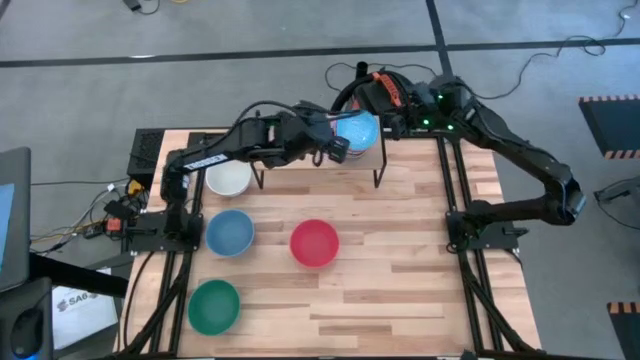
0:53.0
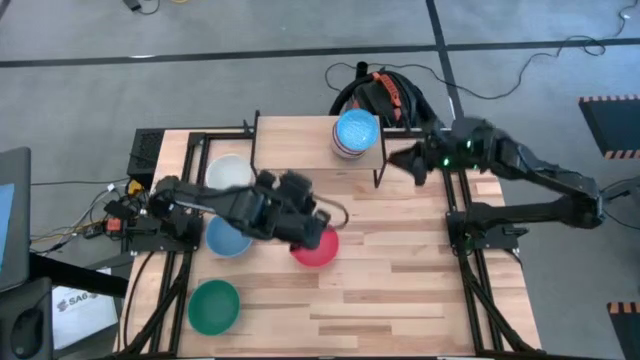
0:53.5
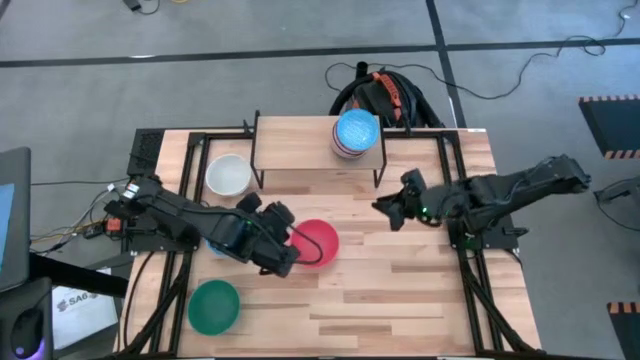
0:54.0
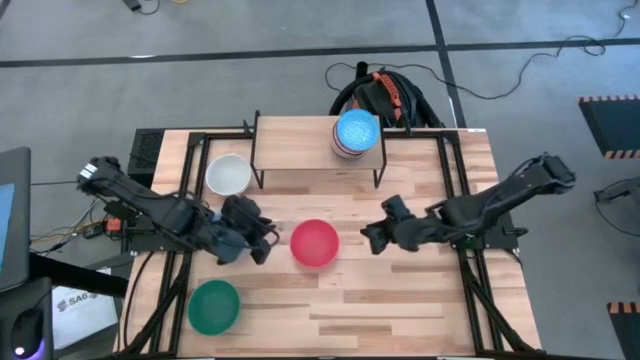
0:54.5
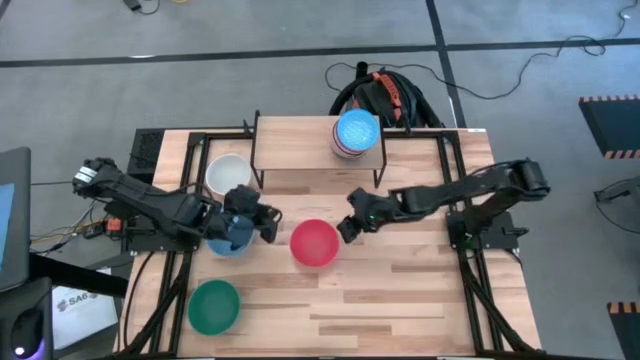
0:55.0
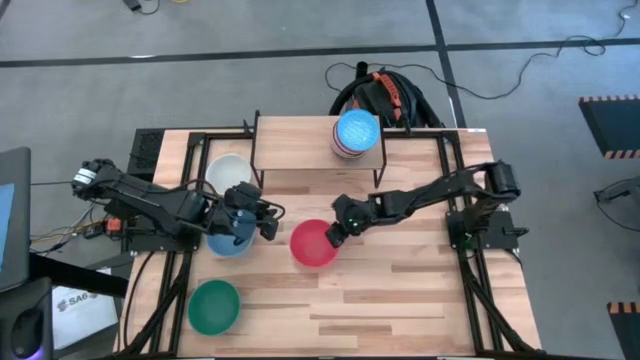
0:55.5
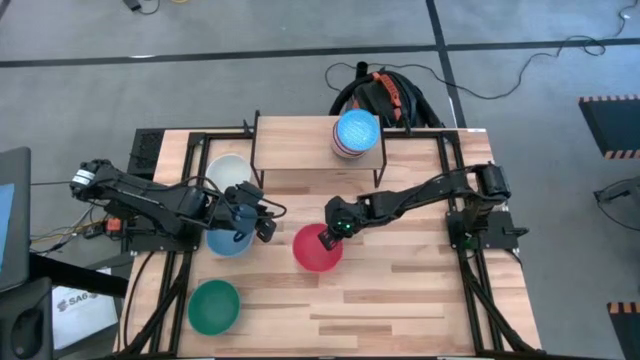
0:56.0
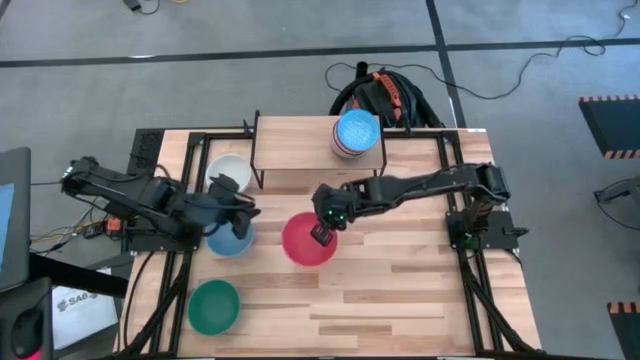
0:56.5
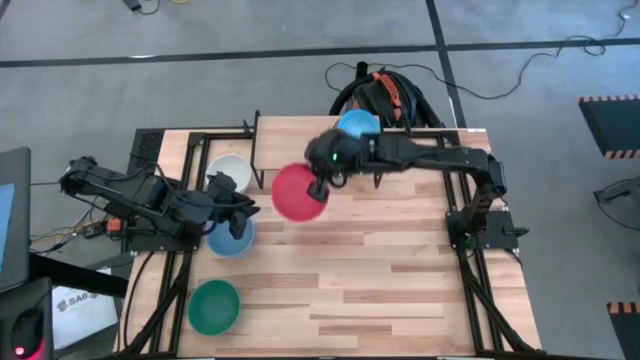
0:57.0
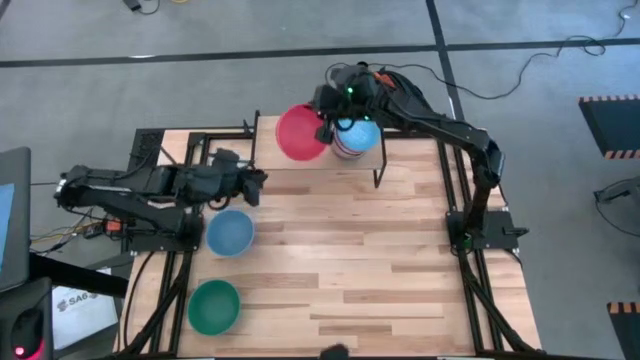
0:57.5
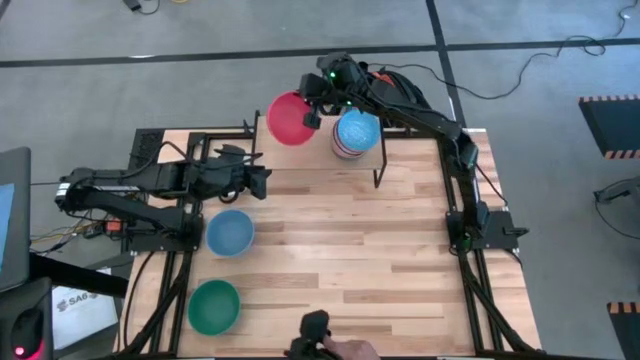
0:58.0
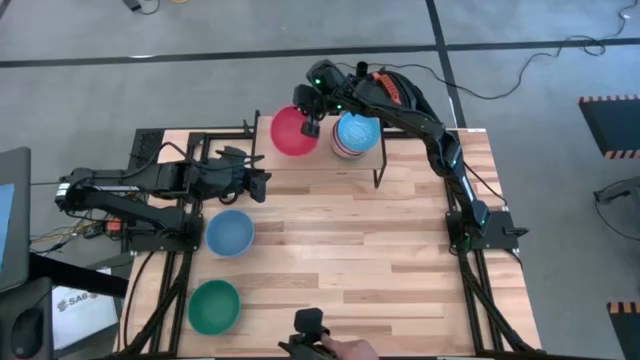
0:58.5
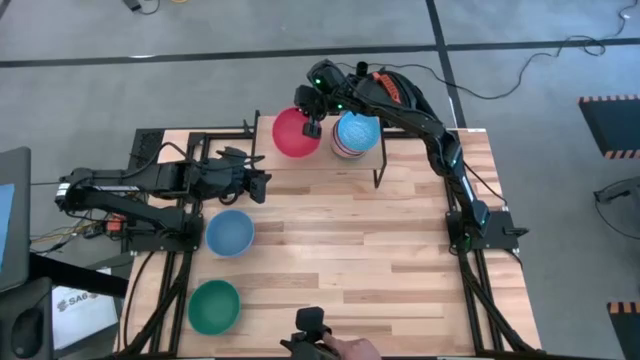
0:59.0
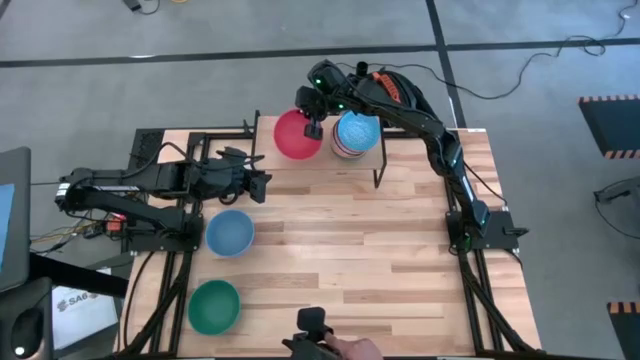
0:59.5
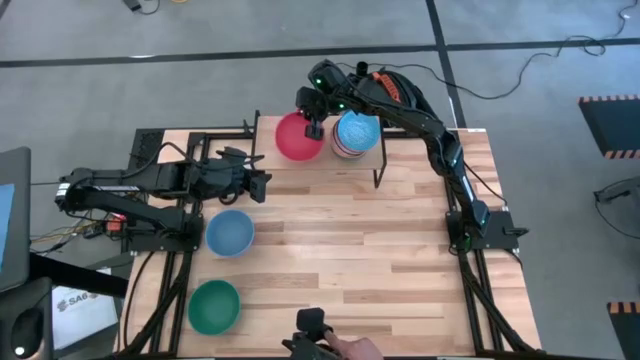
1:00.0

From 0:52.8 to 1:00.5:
Task: Place and stack bowls onto a shelf
Put the red bowl on the shelf

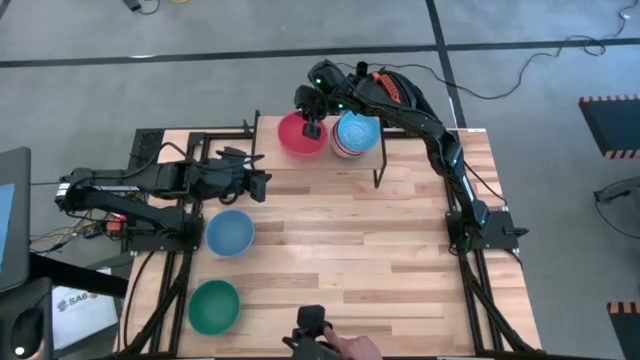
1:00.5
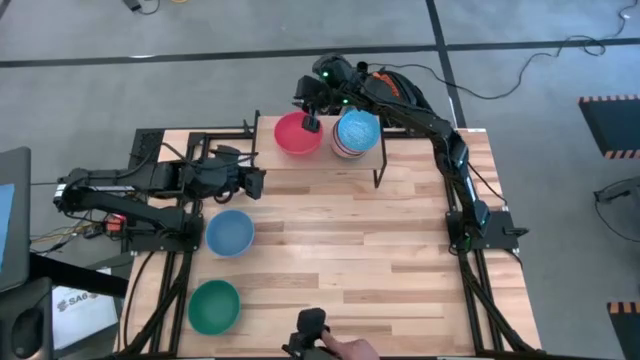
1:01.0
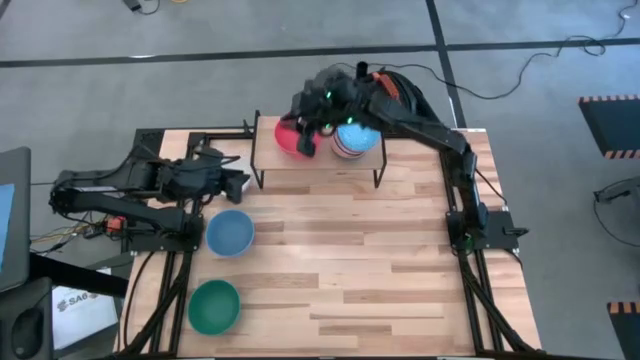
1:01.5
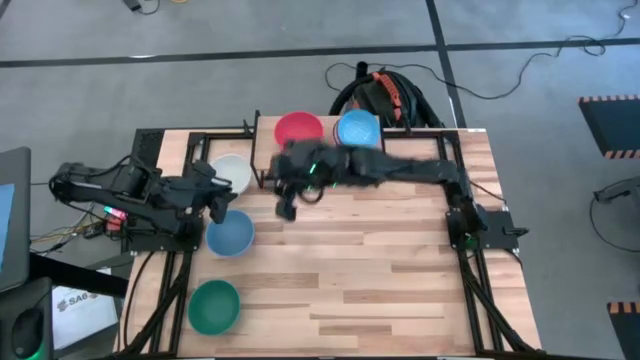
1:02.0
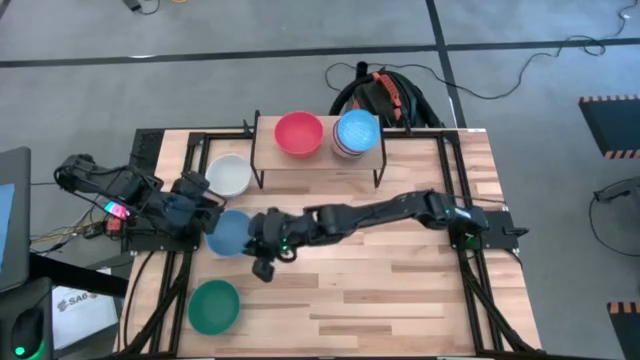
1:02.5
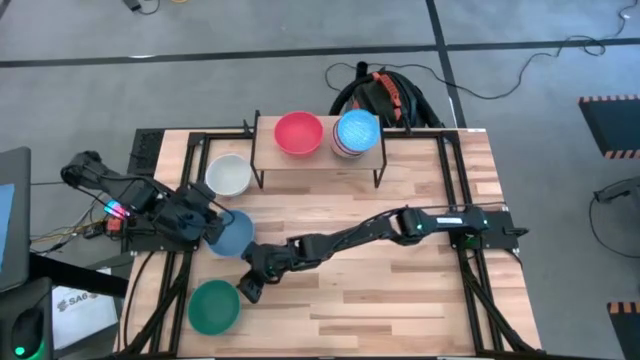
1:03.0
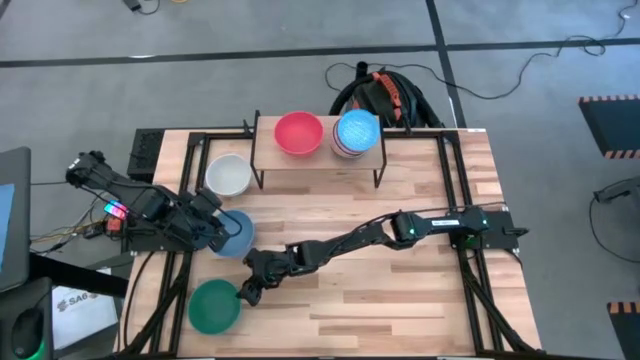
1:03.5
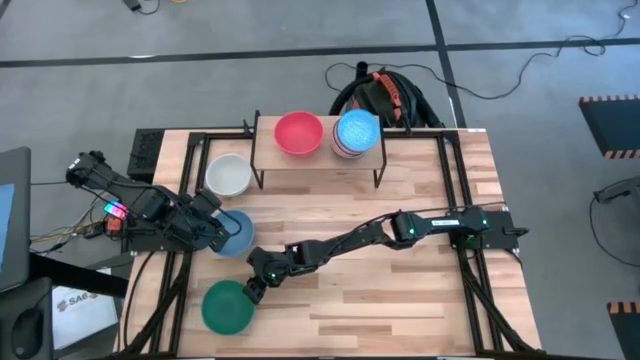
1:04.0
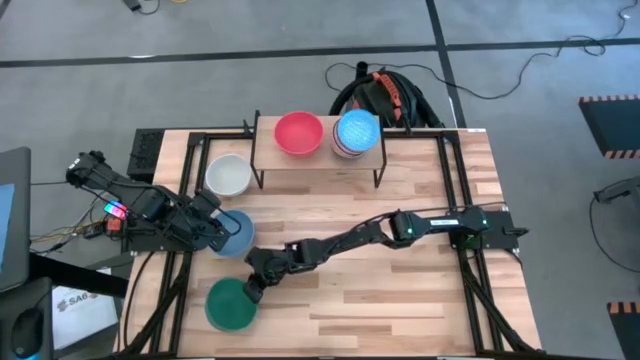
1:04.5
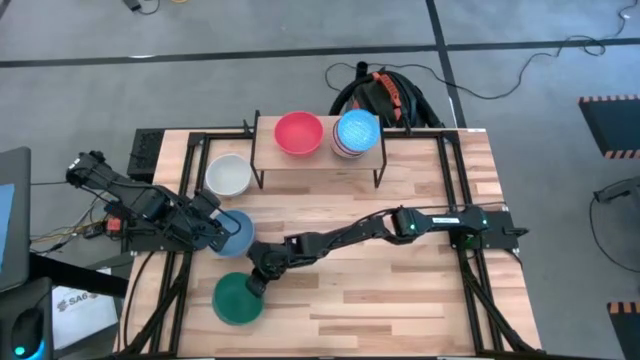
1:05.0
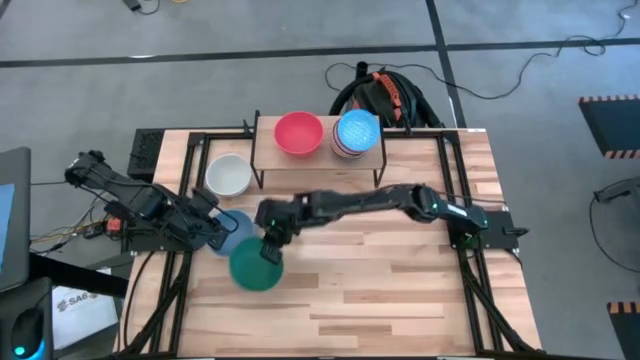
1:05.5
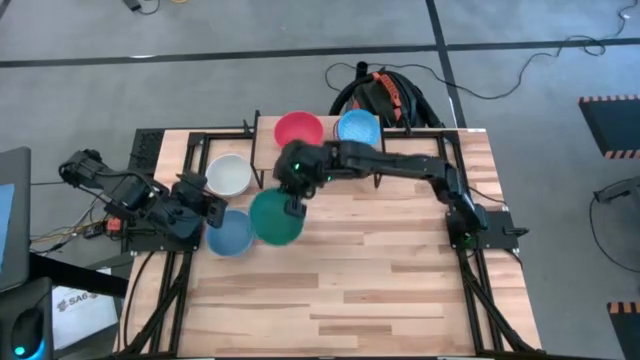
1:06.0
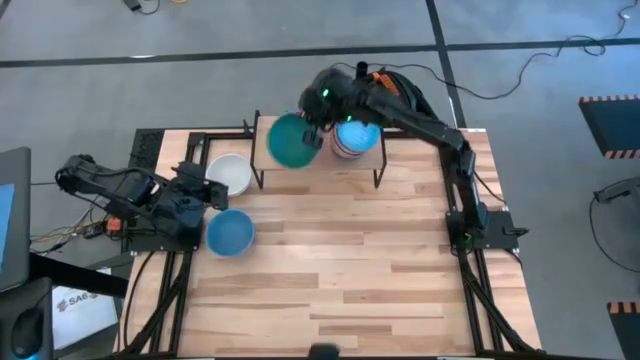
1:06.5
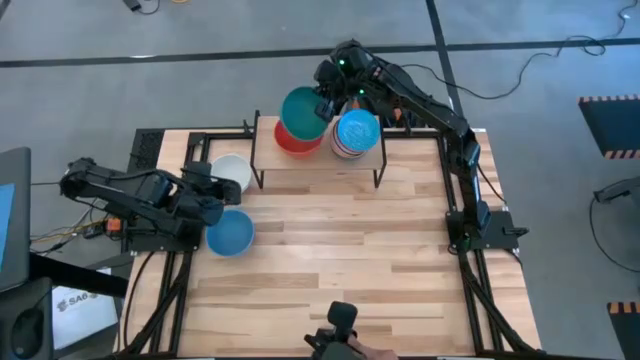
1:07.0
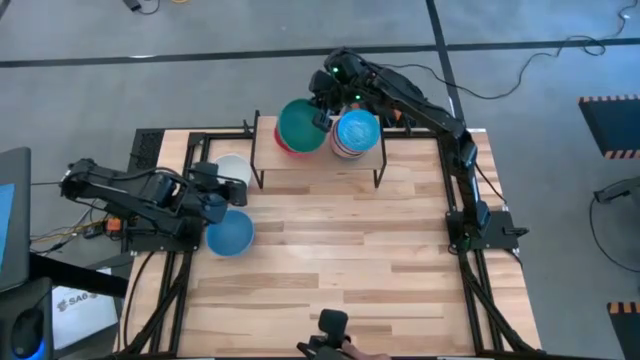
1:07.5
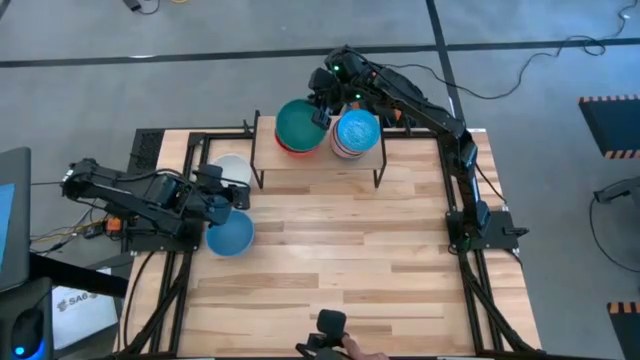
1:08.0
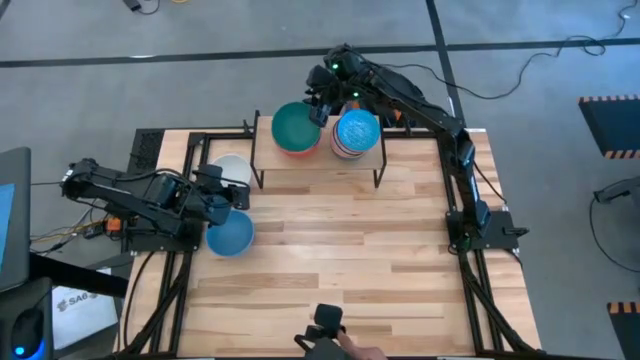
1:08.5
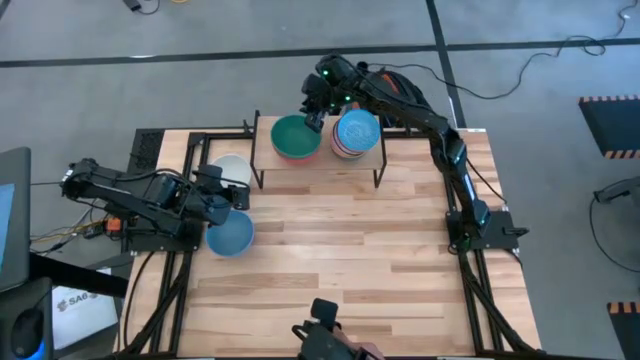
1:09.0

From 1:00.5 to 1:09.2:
Stack the green bowl on top of the red bowl on the shelf

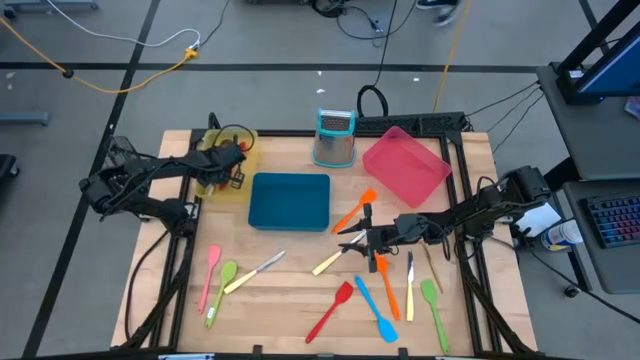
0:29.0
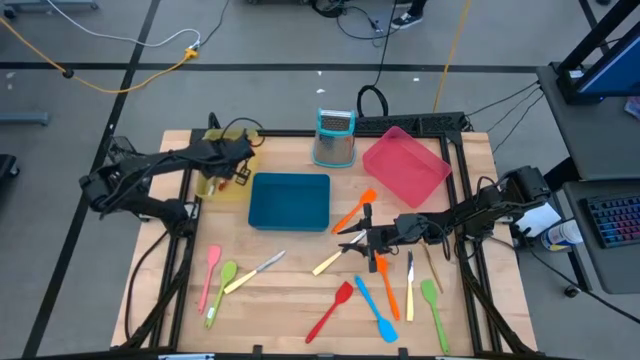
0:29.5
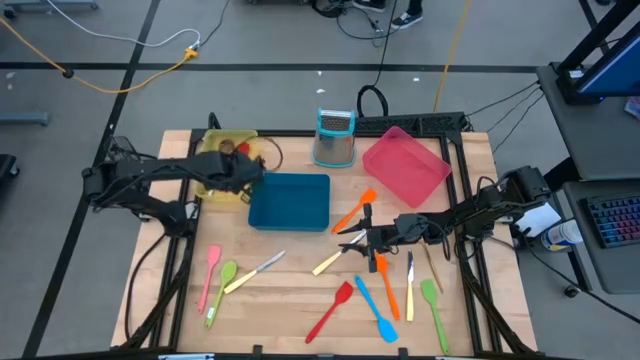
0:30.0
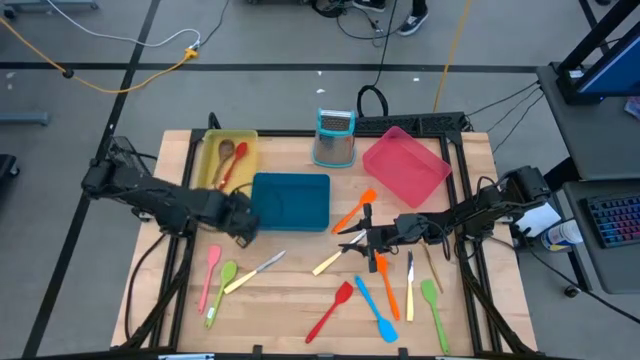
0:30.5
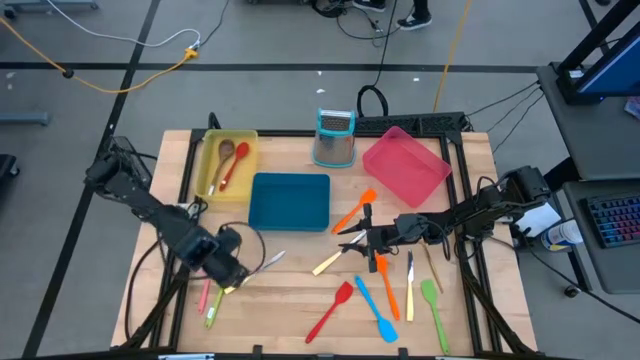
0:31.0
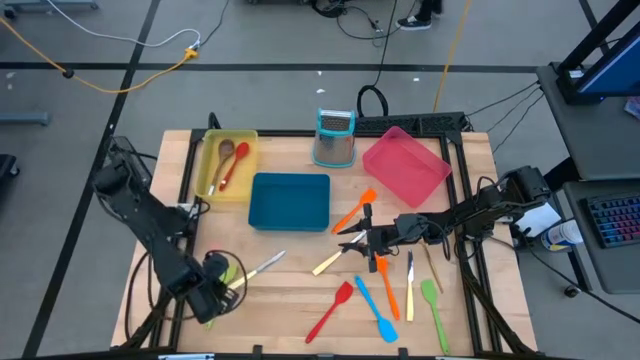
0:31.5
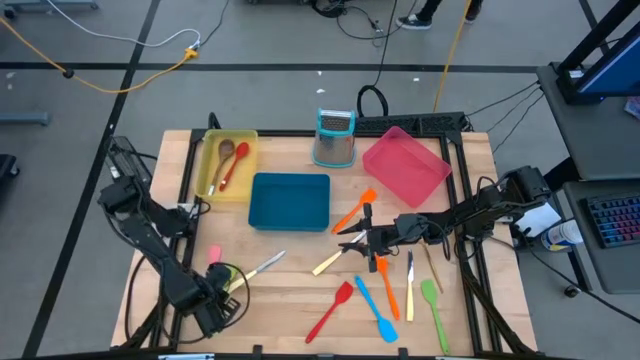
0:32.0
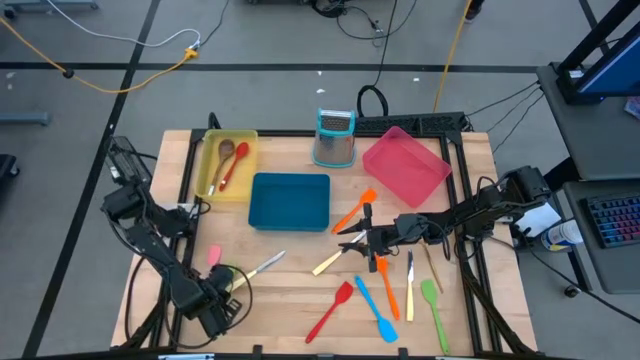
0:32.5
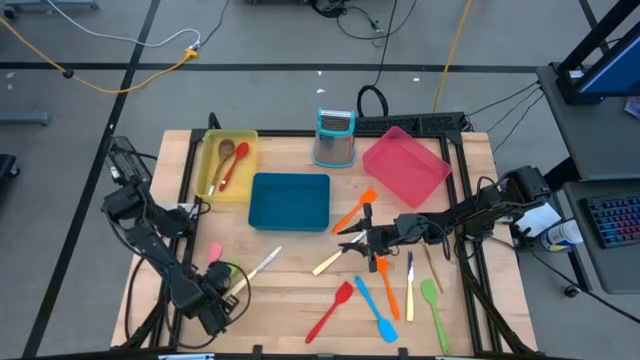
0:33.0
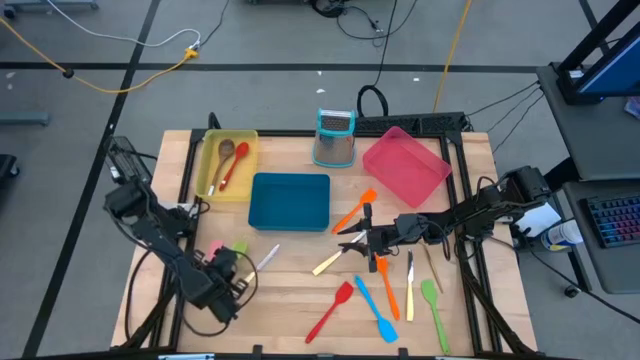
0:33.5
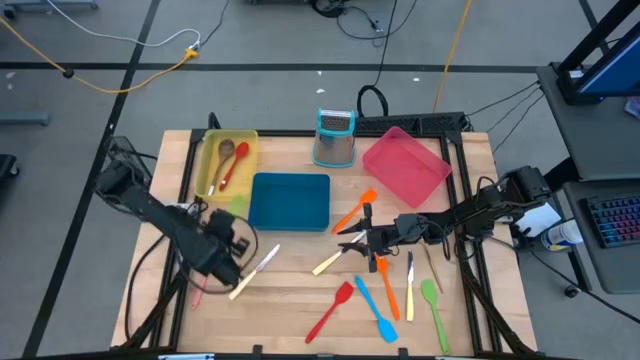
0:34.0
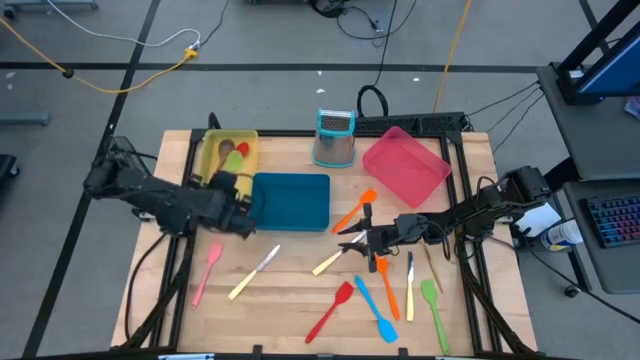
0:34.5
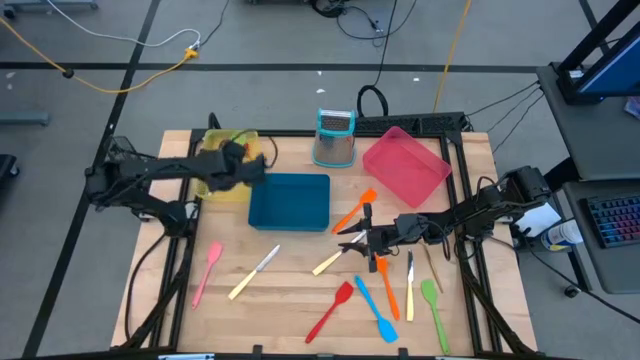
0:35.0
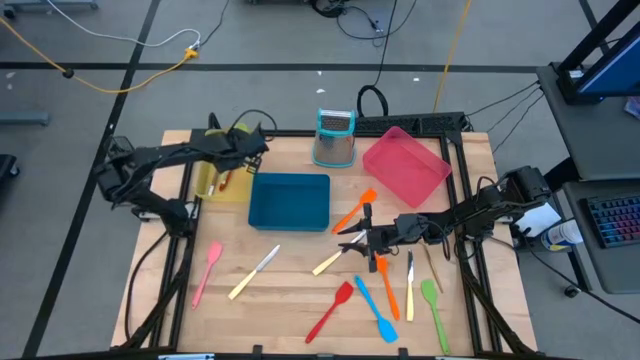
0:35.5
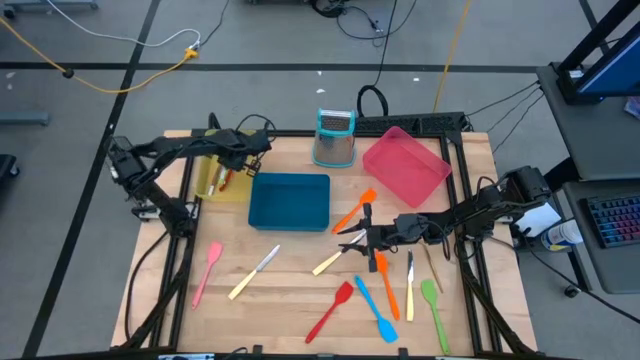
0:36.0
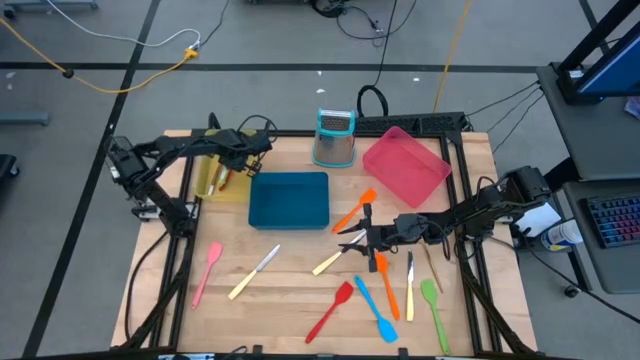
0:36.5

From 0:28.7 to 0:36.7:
Task: Pick & Place Kitchen Items
Put the green serving spoon into the yellow bin
